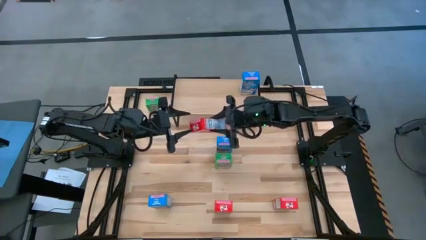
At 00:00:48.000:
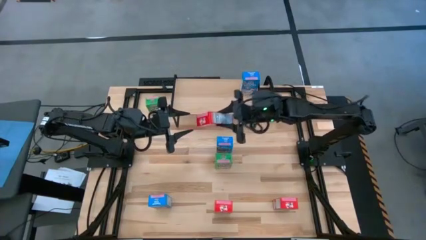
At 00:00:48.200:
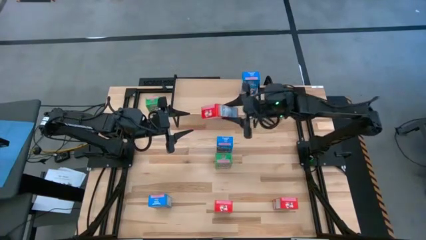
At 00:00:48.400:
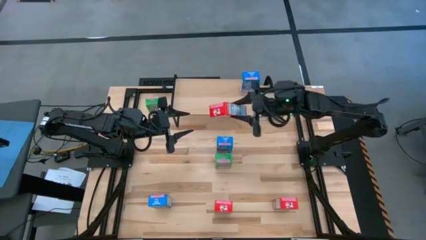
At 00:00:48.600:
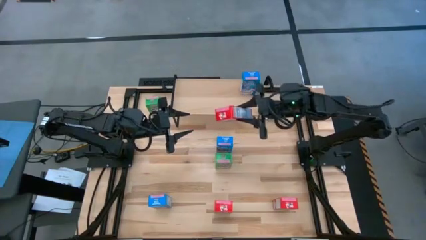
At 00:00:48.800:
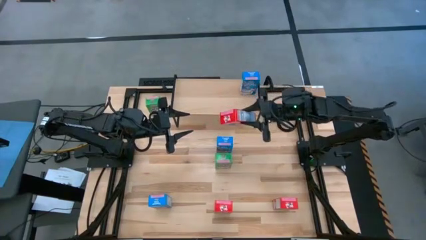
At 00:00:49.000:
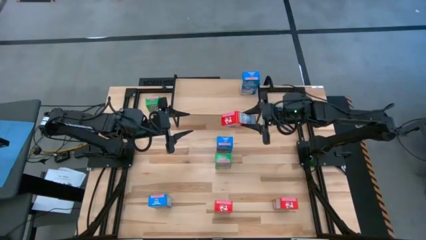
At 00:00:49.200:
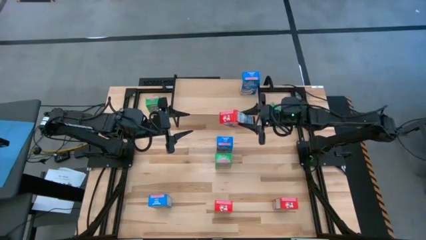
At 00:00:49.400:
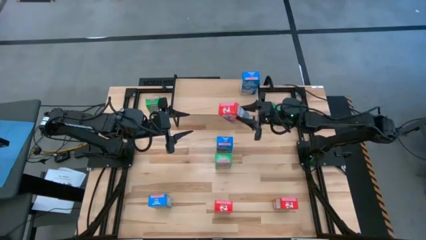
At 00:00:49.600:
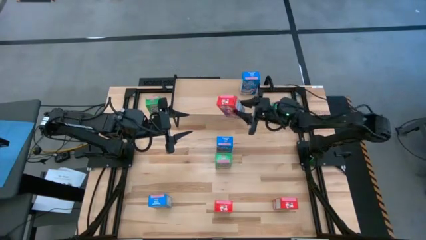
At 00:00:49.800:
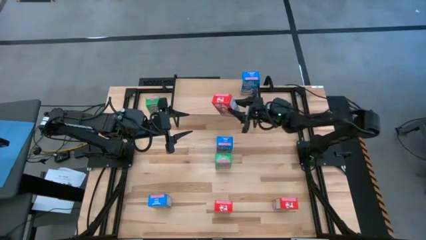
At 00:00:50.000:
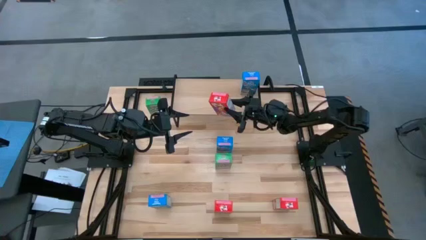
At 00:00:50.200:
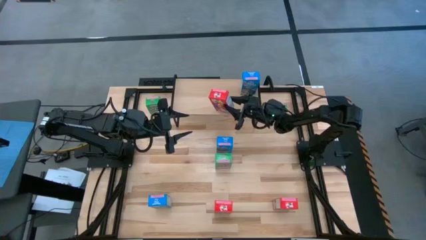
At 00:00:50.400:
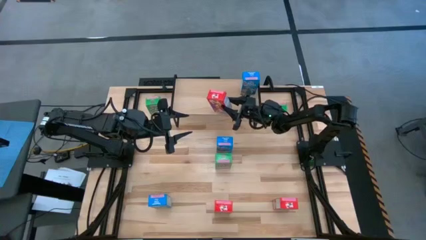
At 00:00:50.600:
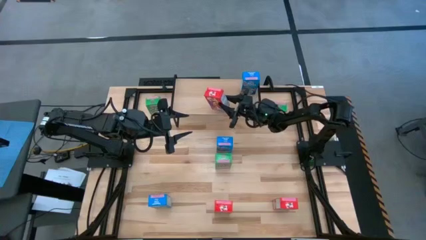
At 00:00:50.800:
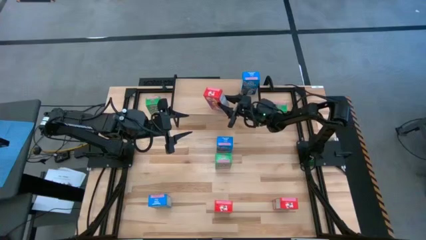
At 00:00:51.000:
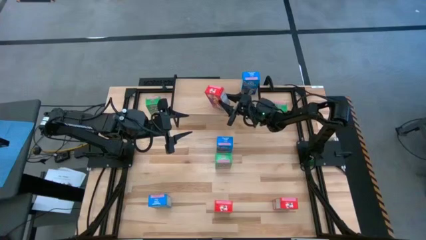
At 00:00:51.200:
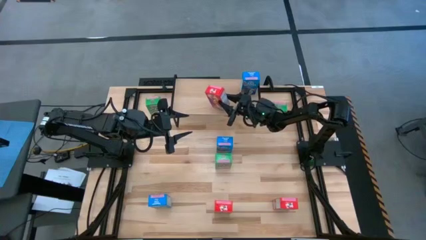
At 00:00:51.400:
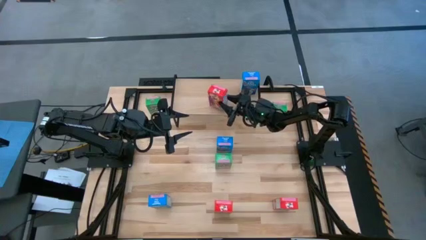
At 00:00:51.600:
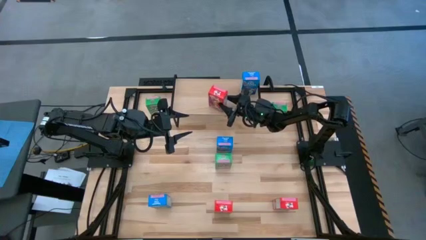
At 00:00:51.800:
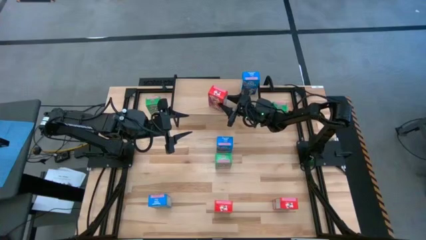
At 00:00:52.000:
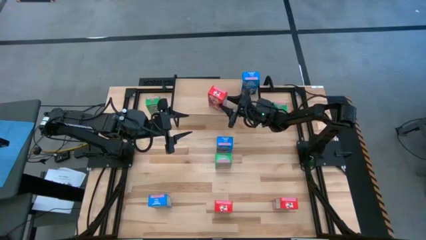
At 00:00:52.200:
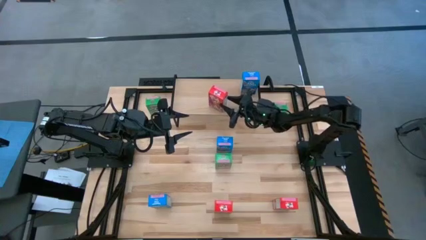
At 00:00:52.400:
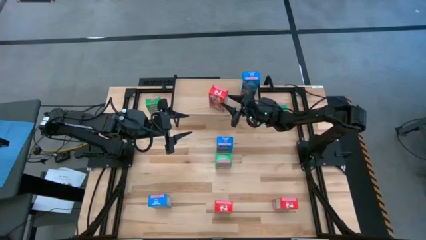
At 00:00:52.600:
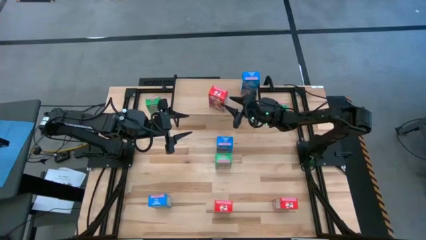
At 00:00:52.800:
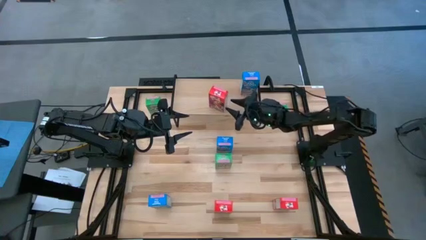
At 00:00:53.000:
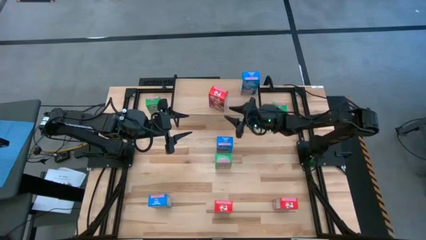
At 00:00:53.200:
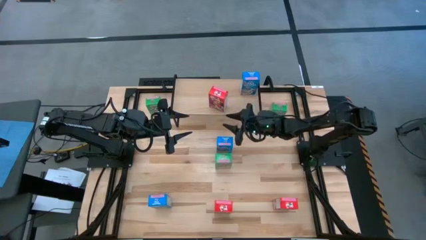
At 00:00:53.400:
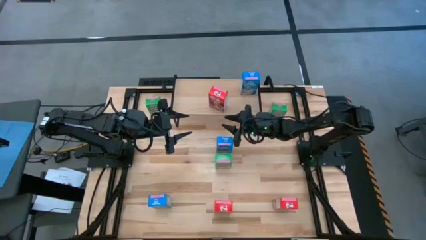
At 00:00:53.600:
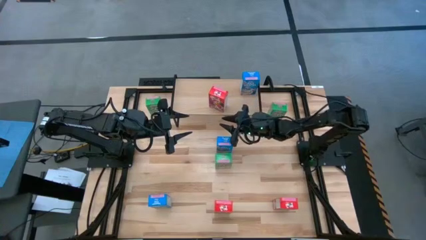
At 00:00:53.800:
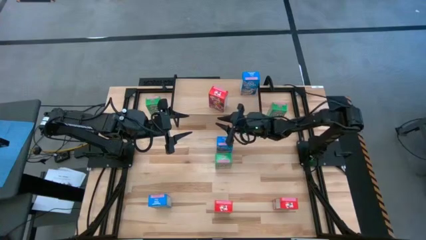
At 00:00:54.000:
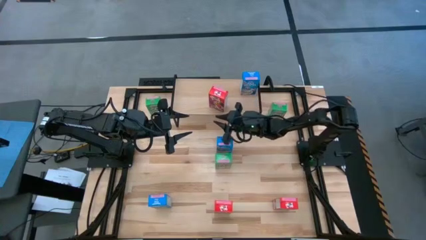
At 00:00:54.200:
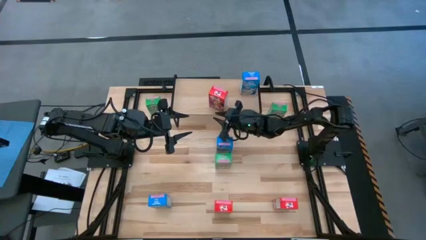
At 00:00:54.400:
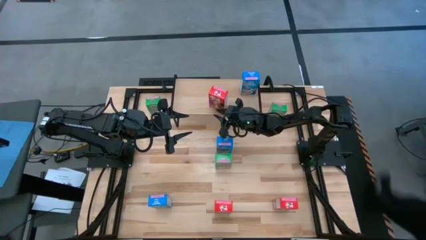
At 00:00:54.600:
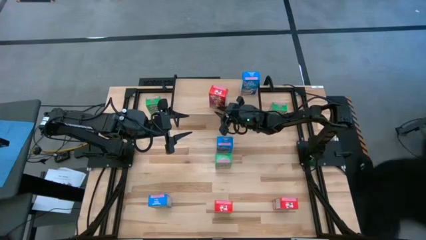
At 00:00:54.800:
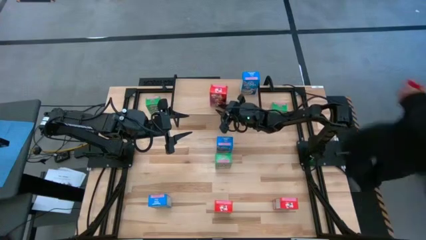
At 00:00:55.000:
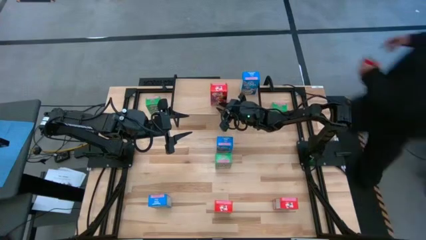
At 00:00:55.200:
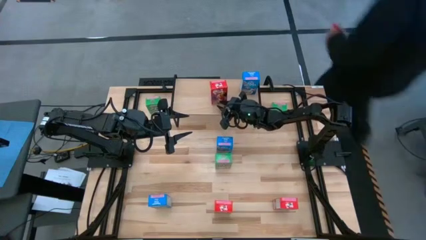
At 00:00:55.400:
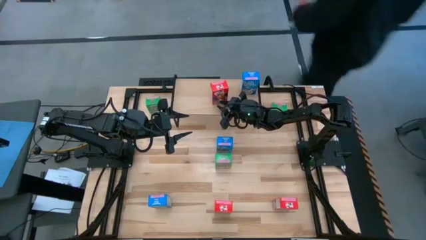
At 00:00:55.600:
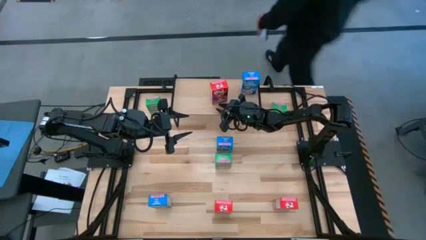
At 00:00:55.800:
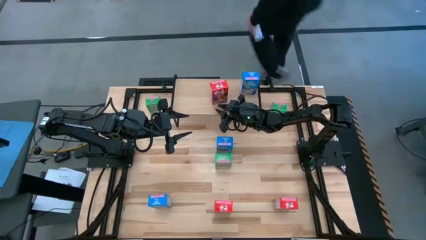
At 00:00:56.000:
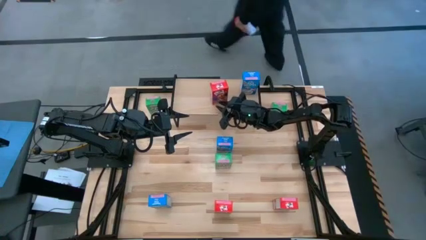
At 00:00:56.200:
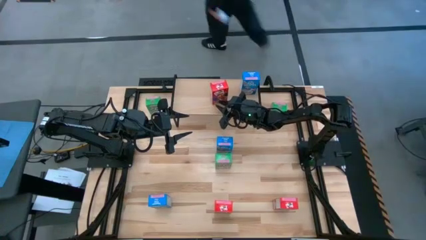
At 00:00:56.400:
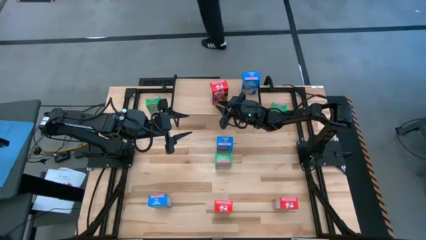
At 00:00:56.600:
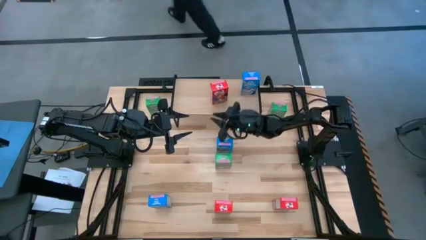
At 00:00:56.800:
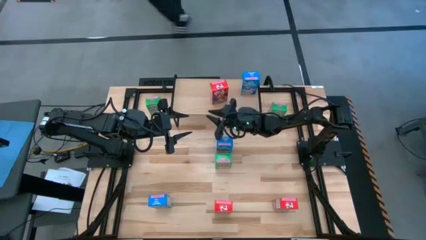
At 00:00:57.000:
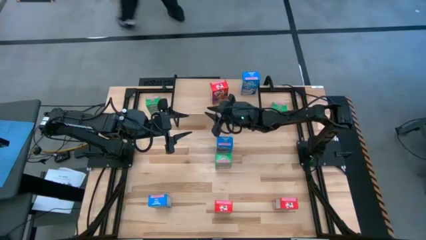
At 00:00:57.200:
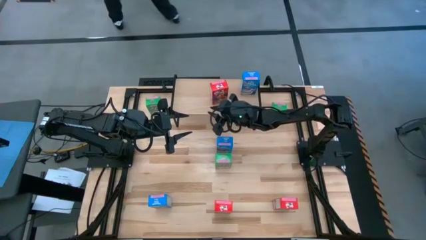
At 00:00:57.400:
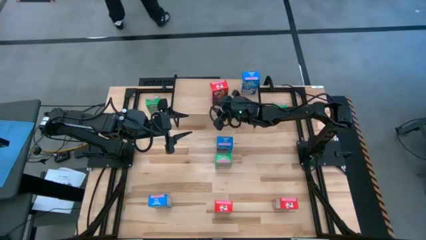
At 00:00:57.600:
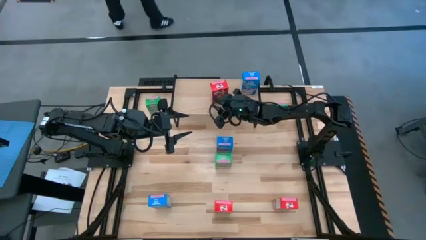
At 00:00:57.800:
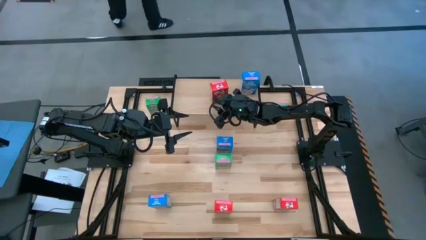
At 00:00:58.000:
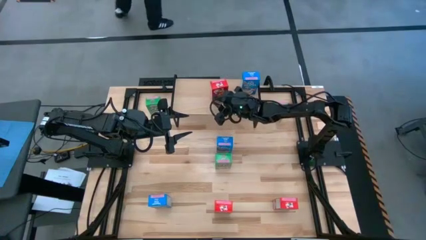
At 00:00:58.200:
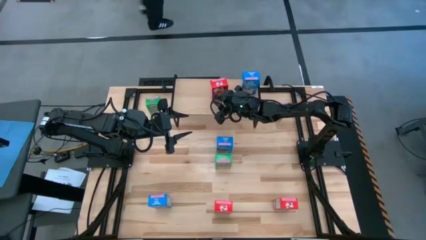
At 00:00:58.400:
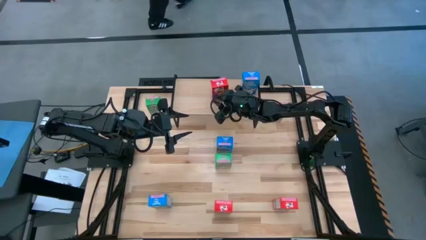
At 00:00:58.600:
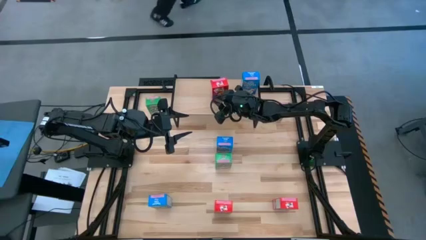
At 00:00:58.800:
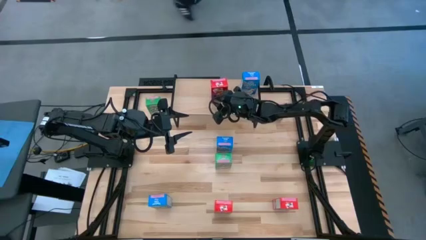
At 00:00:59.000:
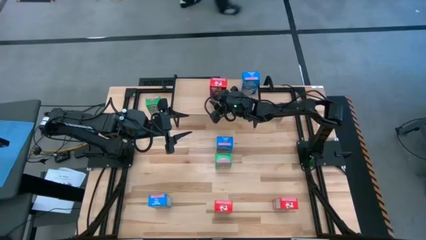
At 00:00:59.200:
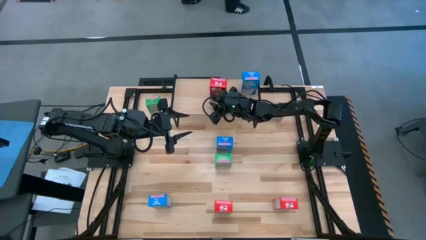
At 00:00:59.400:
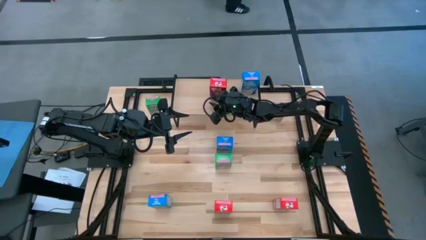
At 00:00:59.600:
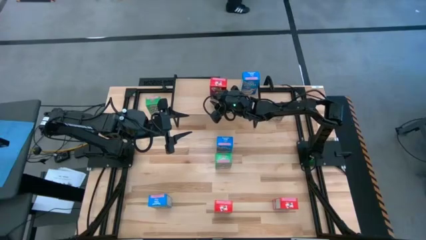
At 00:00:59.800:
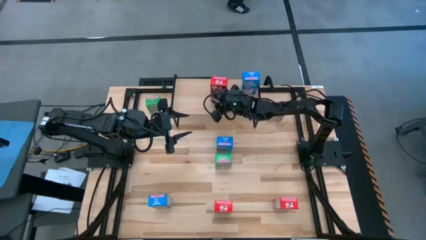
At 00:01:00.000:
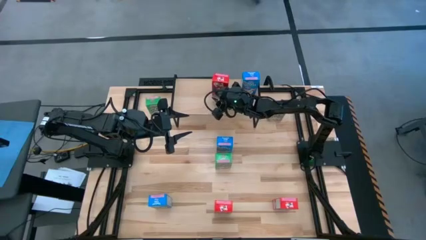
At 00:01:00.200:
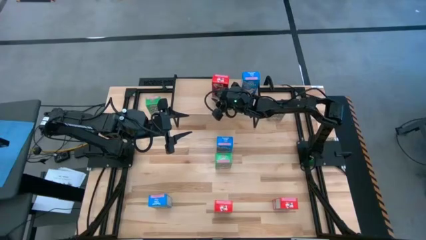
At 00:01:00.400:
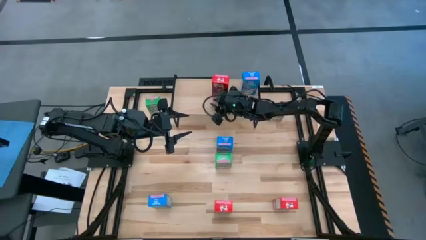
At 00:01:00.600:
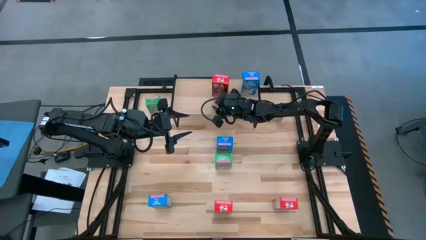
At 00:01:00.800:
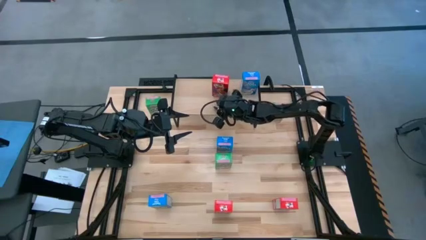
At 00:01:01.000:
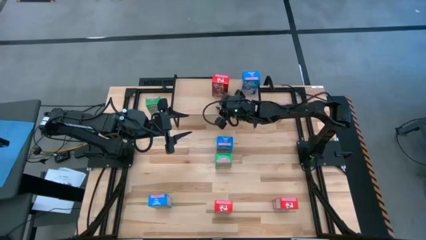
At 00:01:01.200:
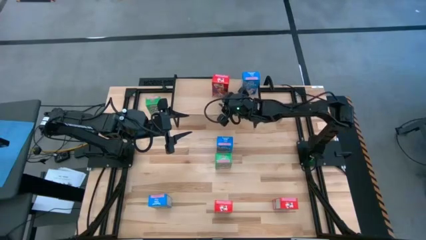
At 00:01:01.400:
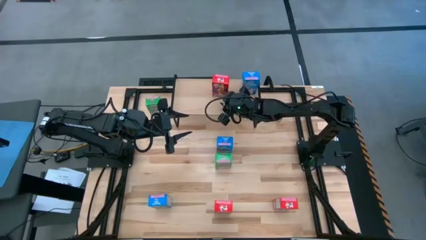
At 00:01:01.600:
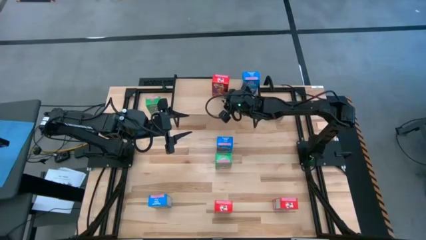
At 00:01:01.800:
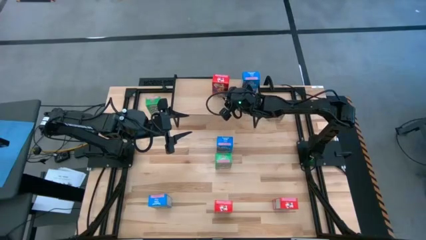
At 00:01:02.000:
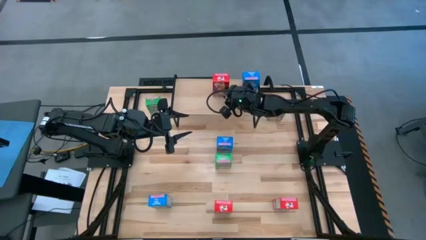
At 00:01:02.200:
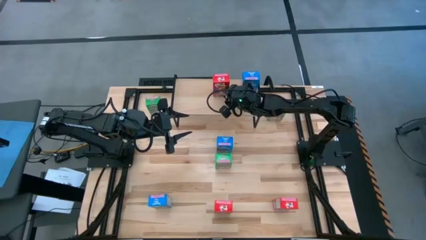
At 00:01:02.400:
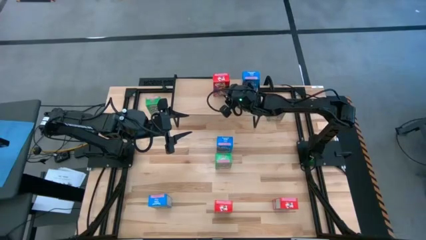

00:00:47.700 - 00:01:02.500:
Task: Stack cereal on shelf
Put the top red cereal box on the shelf

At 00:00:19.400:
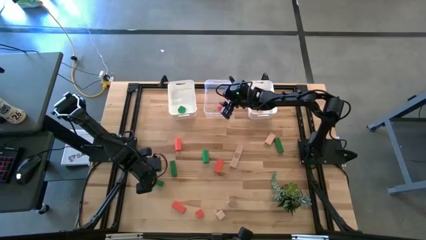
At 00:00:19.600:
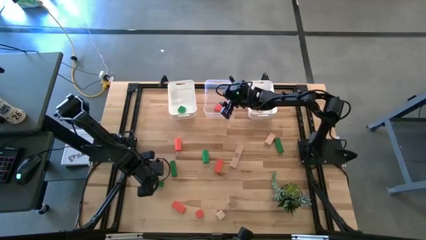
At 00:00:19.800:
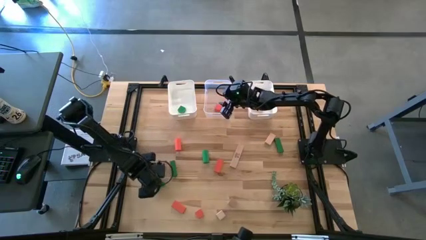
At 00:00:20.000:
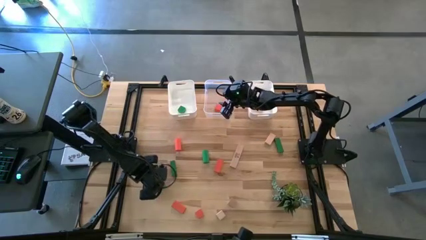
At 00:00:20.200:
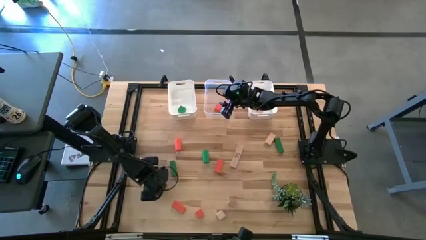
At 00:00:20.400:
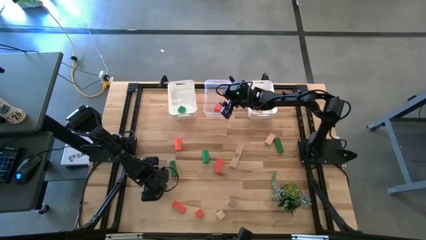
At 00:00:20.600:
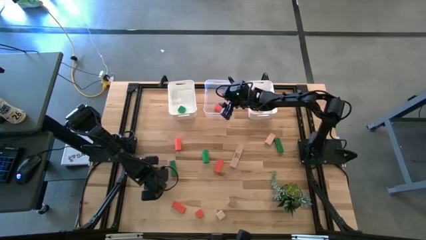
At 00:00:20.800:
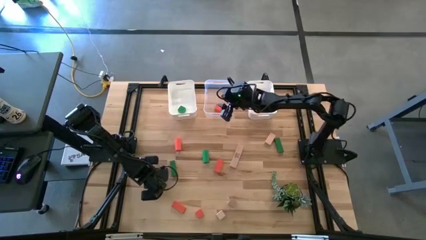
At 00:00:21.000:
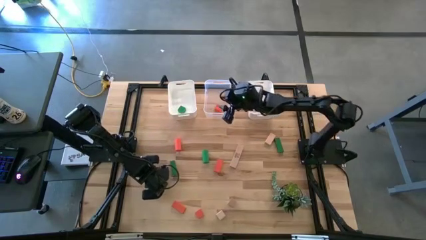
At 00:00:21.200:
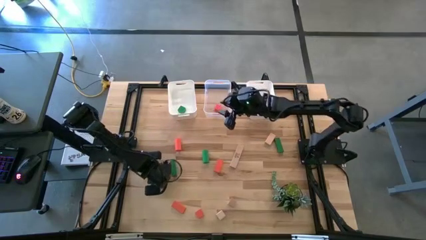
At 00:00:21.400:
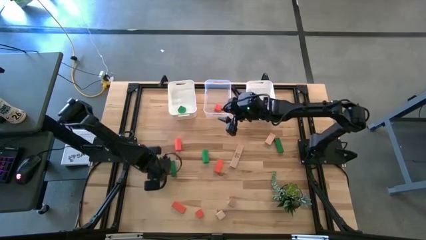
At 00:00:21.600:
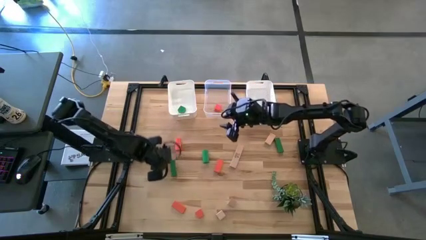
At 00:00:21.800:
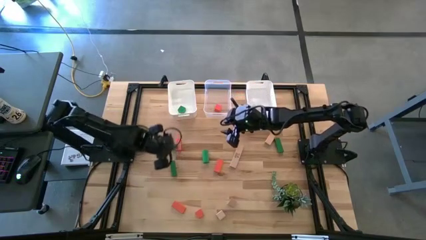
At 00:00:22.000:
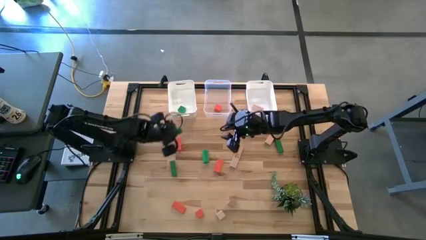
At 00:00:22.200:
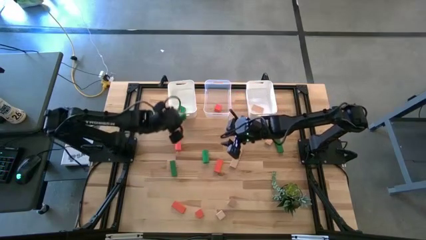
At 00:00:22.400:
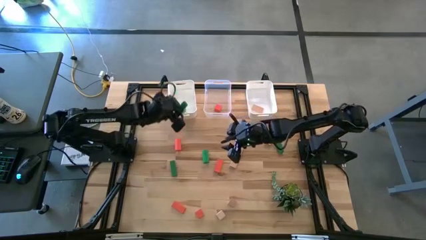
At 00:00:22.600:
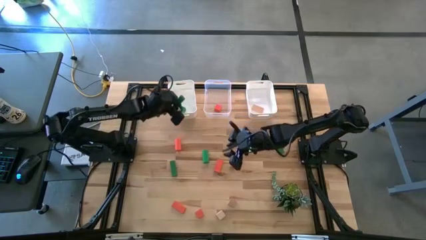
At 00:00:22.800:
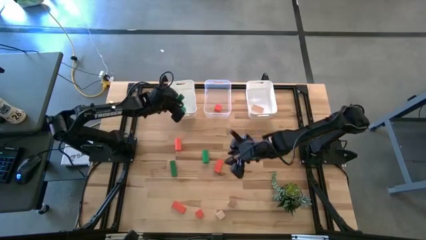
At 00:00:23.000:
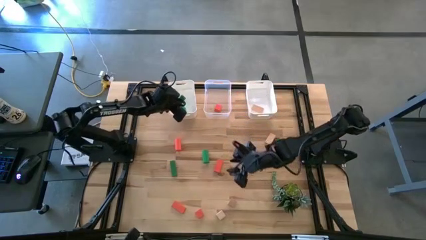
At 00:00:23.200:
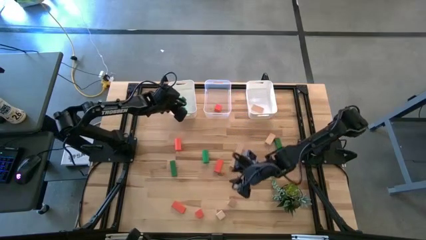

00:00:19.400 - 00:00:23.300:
Task: Sort & place blocks by color
Put the green block into the left white bin
